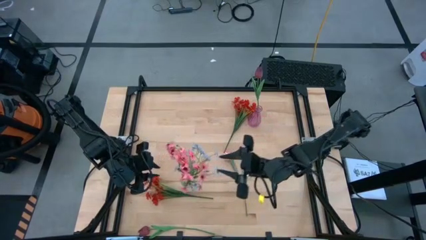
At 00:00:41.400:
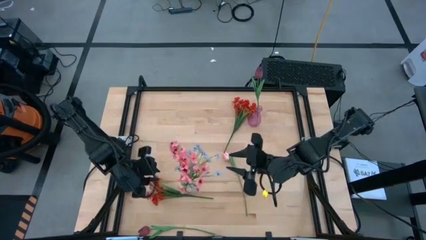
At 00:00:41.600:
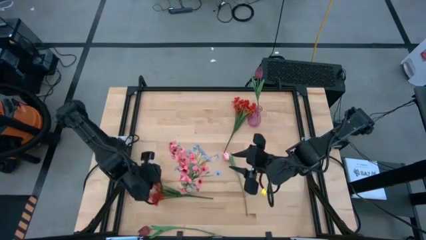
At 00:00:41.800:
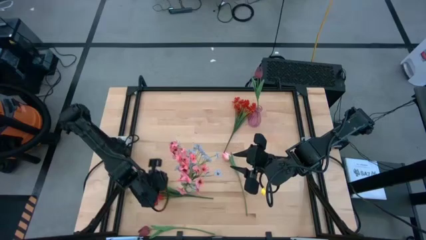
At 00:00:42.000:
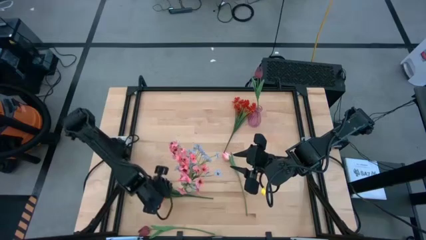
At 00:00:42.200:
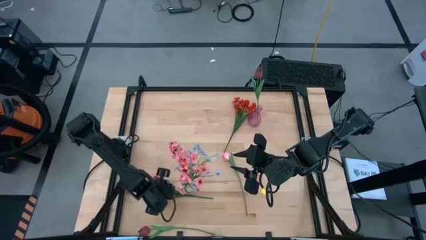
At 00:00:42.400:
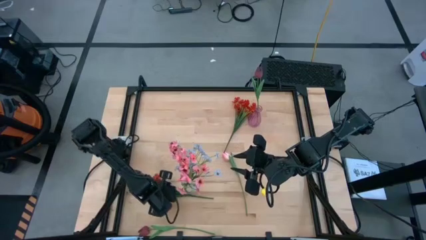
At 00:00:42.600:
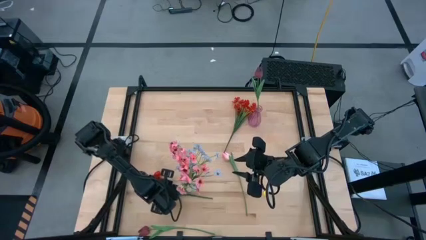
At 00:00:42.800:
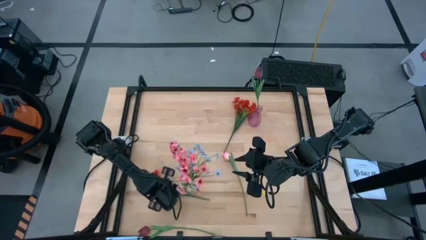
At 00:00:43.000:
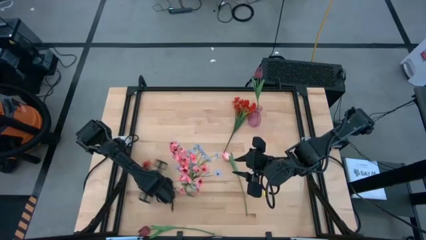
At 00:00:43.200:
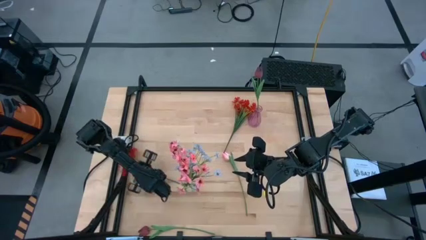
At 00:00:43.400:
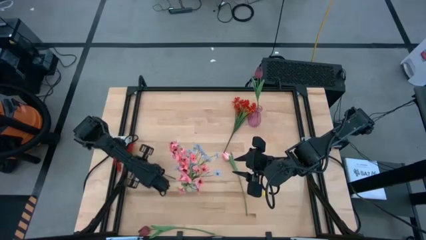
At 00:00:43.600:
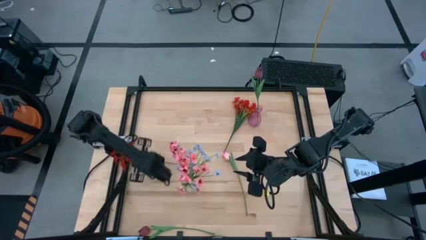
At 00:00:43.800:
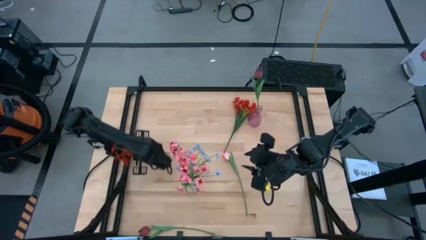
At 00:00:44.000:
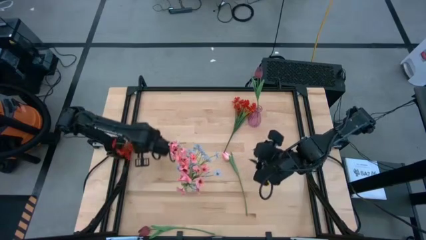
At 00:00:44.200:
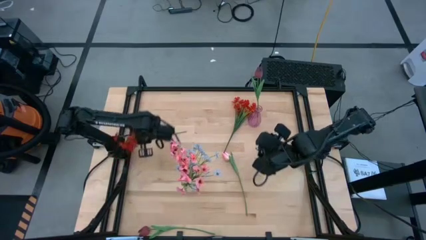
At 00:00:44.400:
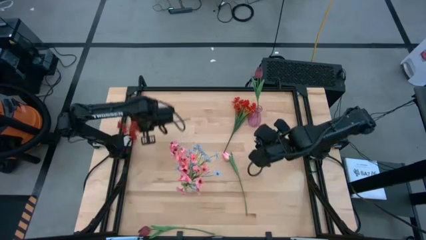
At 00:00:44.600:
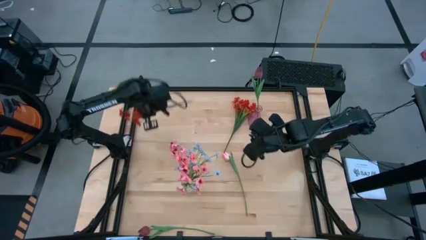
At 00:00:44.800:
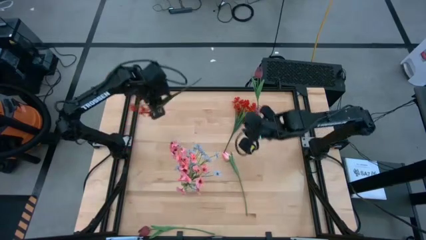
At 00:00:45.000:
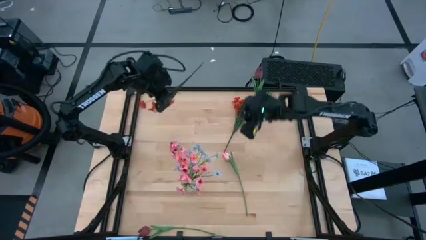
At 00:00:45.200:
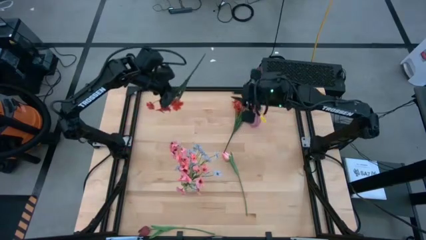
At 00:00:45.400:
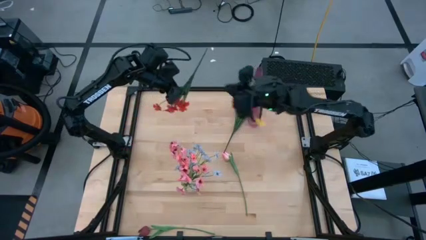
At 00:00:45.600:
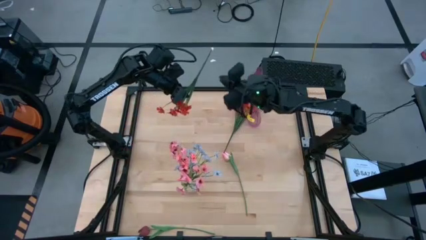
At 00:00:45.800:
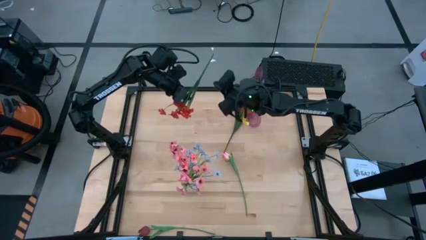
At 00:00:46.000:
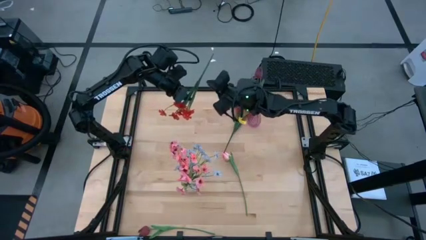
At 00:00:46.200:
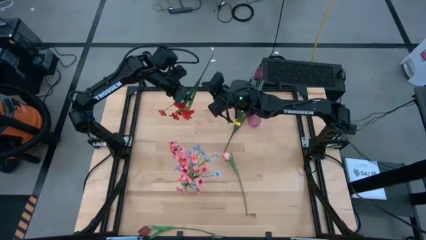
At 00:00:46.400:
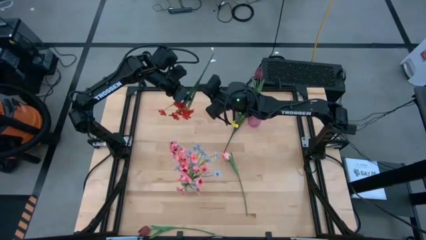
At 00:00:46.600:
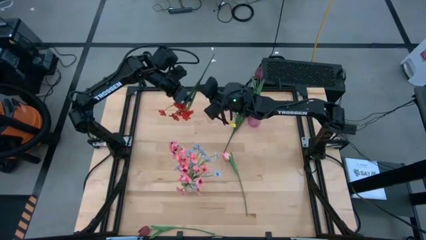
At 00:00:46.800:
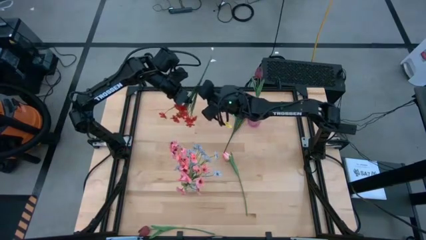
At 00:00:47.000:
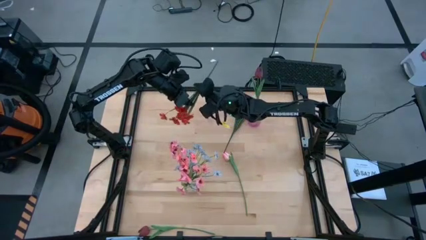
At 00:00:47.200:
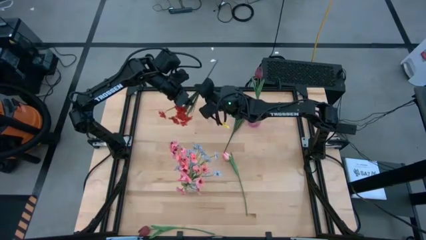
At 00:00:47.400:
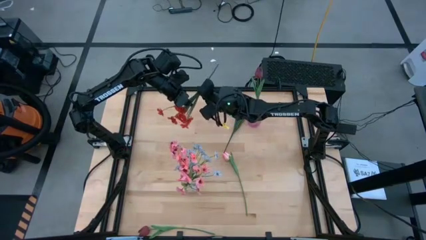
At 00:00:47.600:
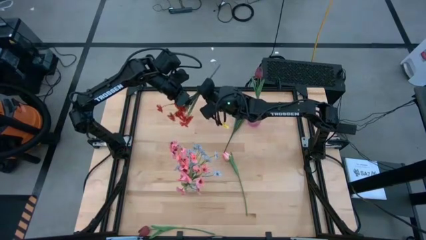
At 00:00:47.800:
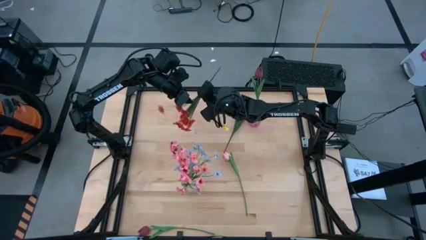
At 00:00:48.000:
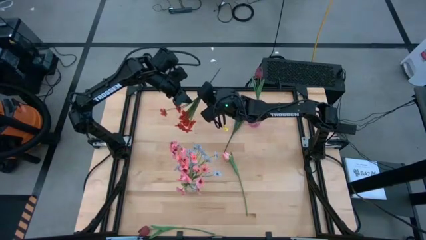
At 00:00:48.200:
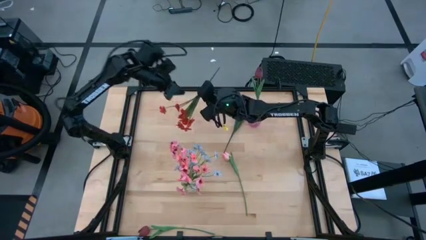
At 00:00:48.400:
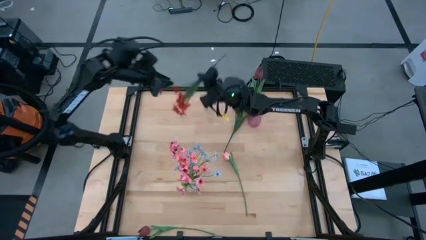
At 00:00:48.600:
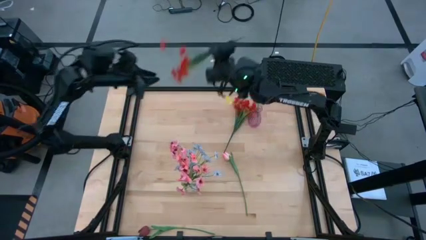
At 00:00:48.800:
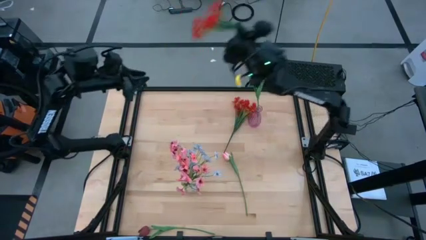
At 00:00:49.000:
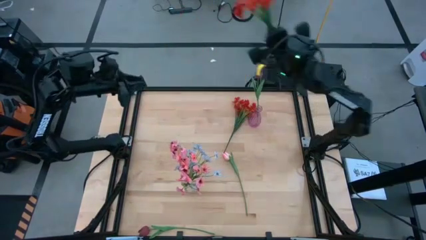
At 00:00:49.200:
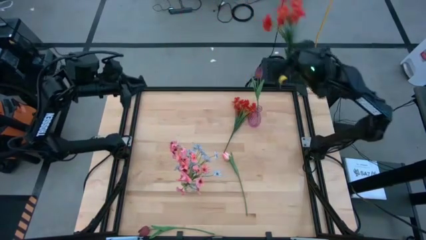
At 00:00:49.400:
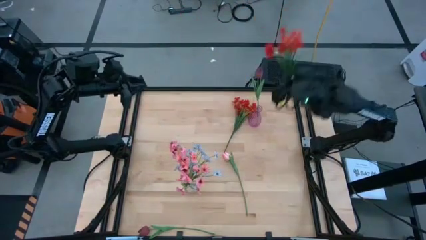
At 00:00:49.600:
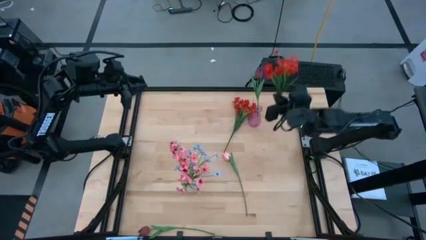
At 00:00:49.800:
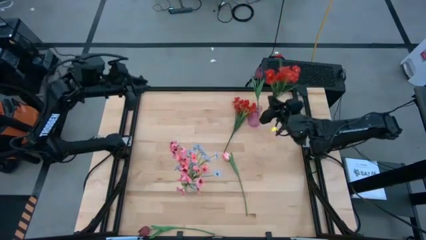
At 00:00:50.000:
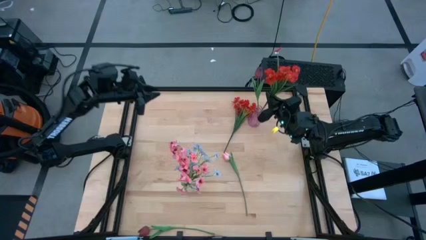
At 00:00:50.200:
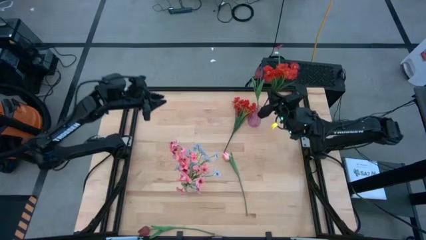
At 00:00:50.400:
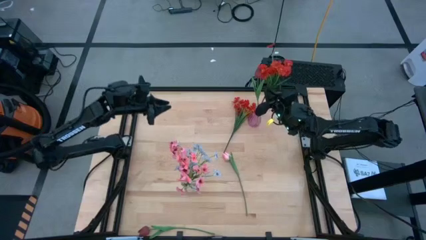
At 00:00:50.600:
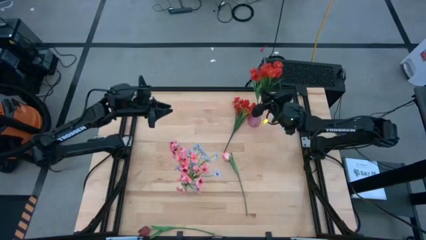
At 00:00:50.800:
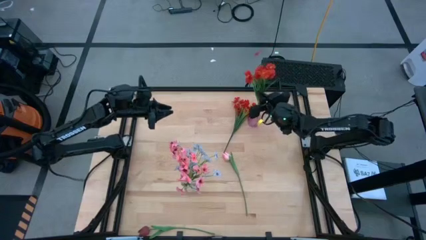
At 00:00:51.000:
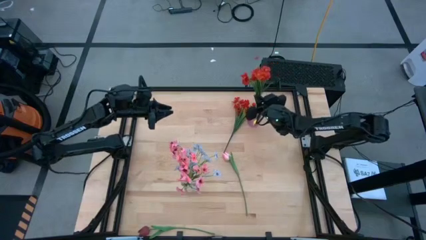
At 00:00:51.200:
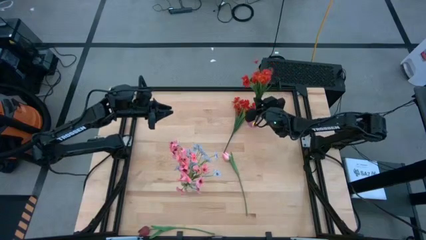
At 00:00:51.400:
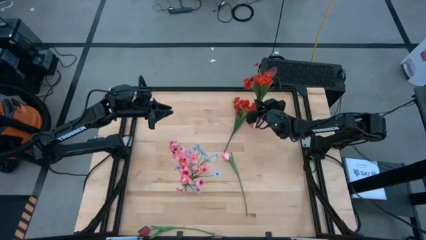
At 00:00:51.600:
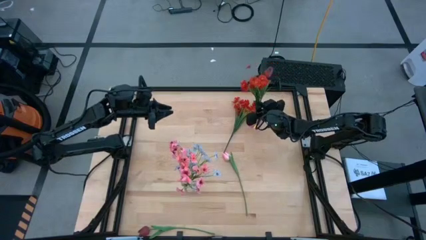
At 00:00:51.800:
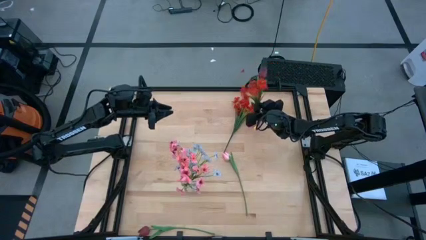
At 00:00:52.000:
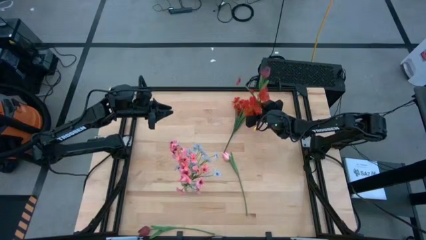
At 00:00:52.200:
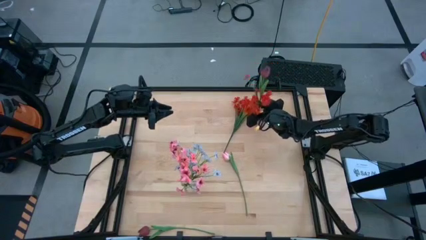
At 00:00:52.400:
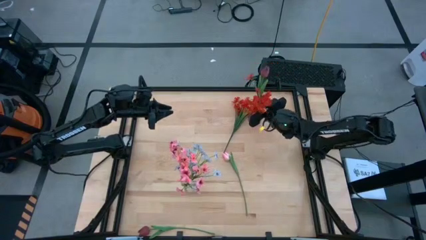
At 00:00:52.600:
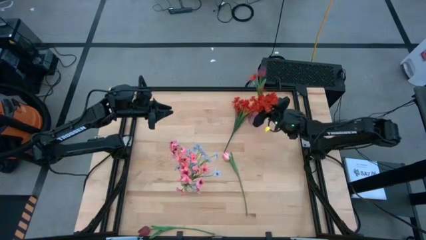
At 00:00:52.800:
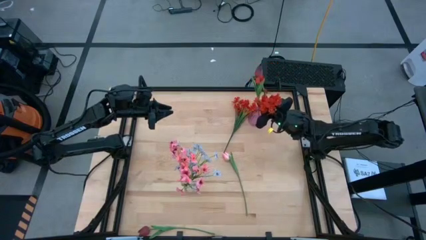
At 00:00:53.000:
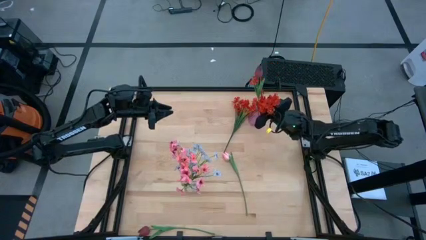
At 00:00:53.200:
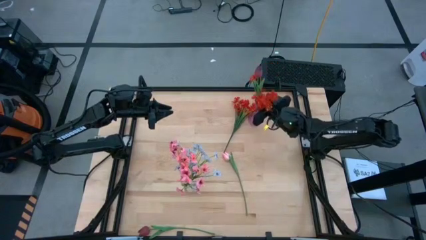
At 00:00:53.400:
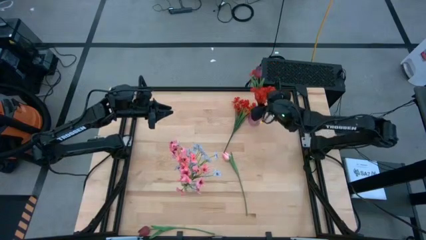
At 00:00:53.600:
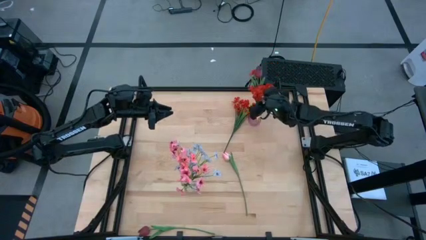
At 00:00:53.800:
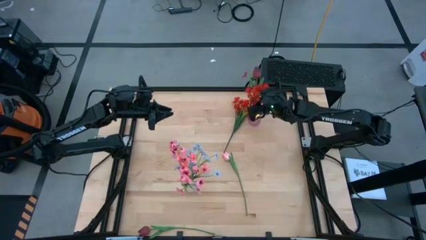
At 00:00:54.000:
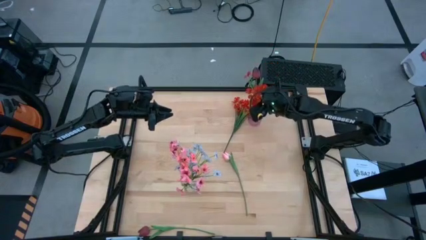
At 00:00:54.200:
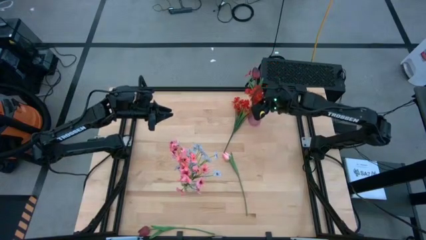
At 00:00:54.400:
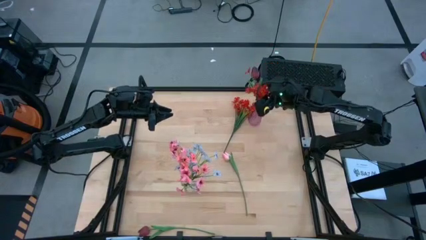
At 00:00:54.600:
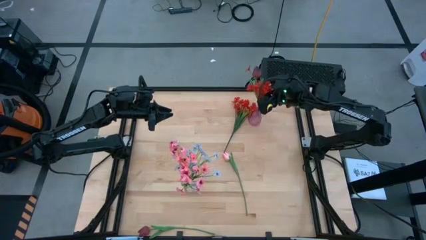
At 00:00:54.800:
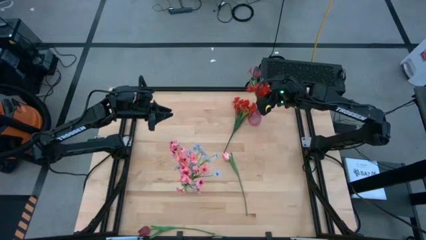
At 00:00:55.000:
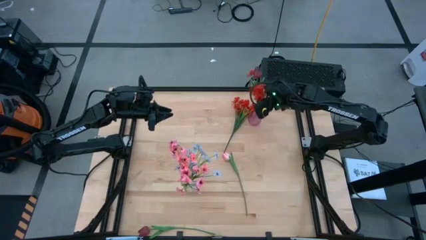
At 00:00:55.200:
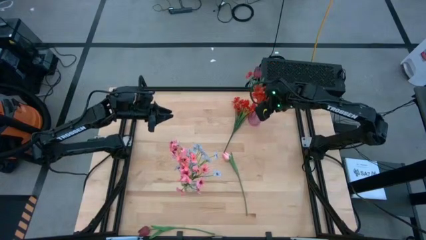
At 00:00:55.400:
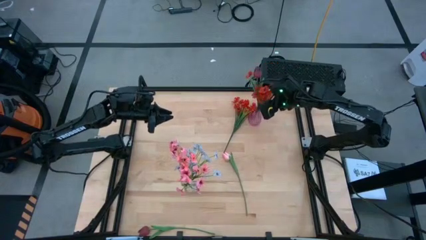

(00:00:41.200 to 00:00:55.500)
Task: Sort flowers into vase by color
Put the bottom orange flowers into the purple vase
